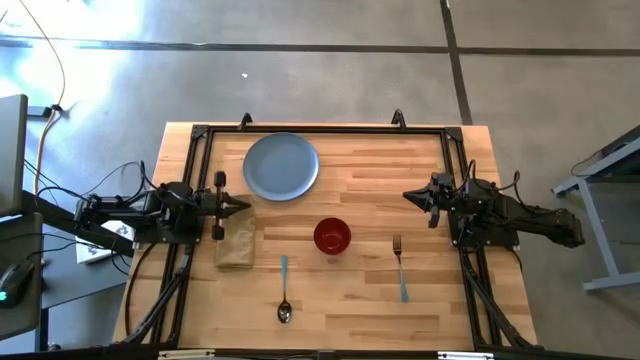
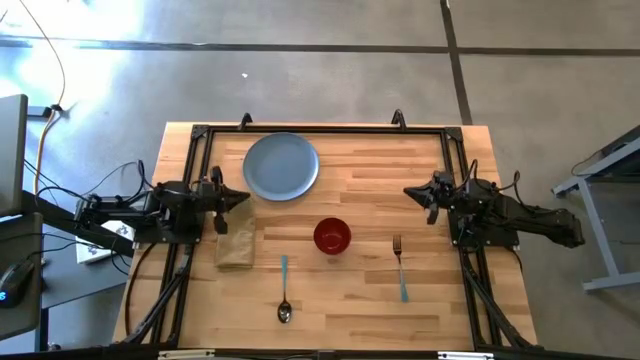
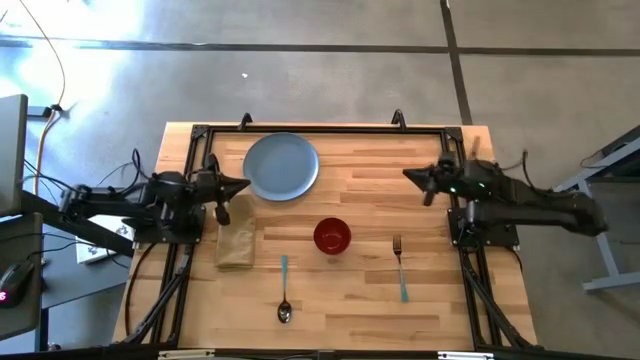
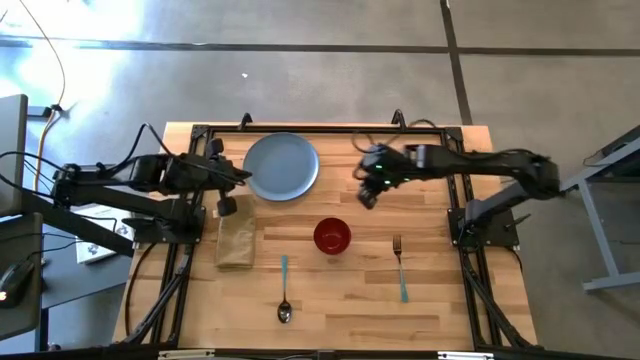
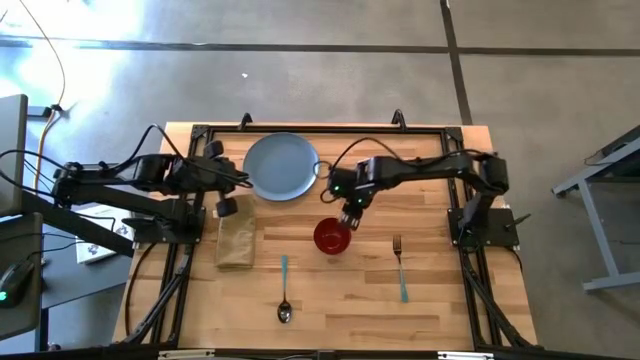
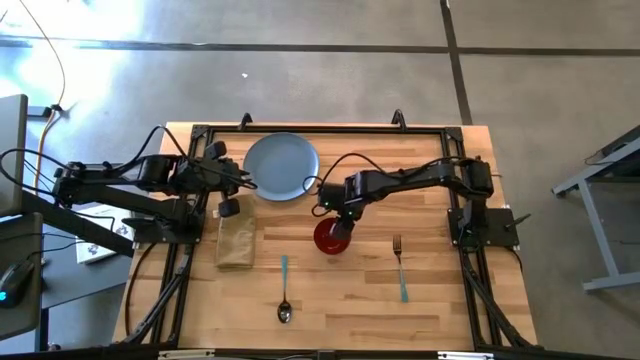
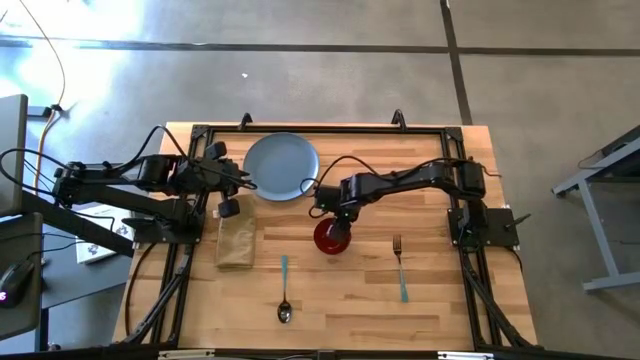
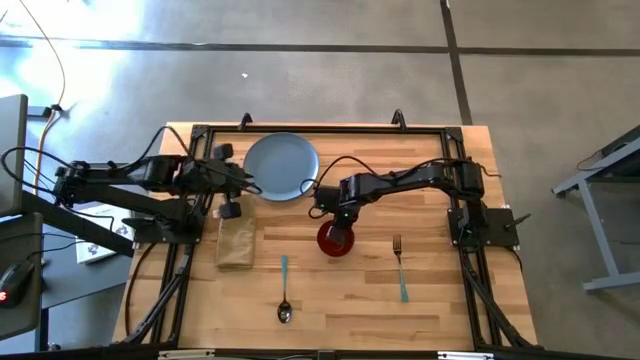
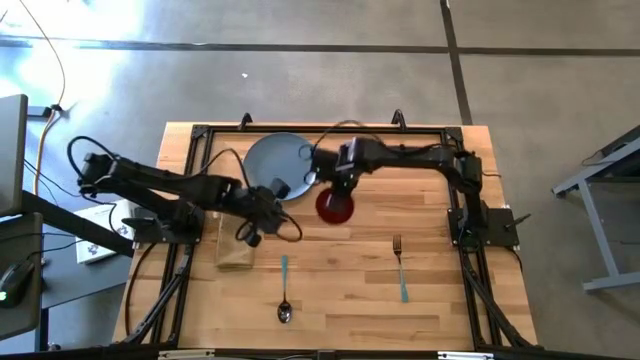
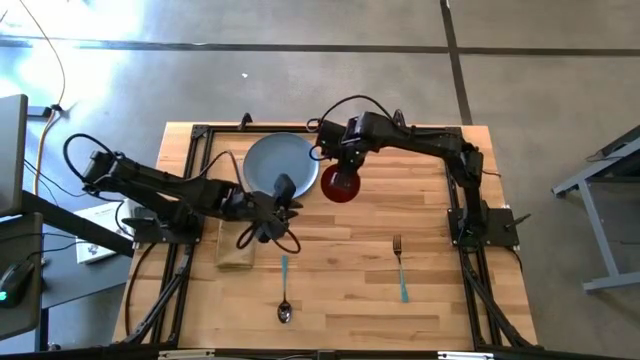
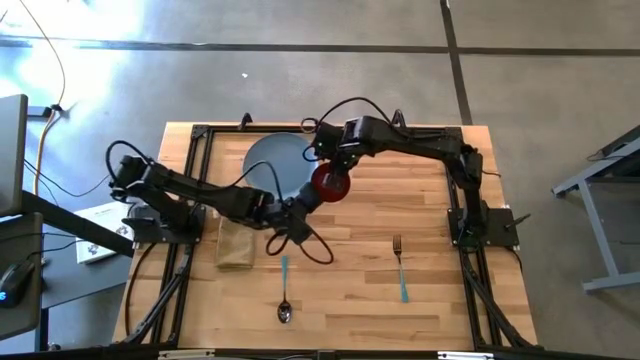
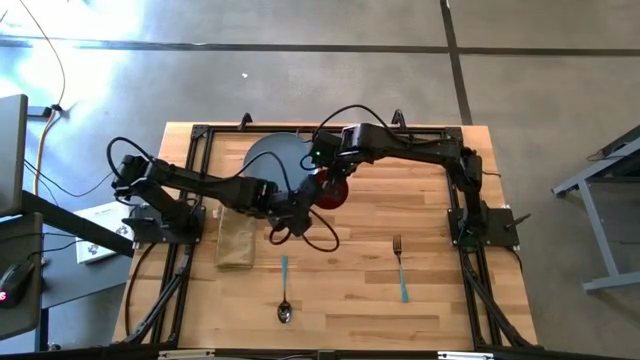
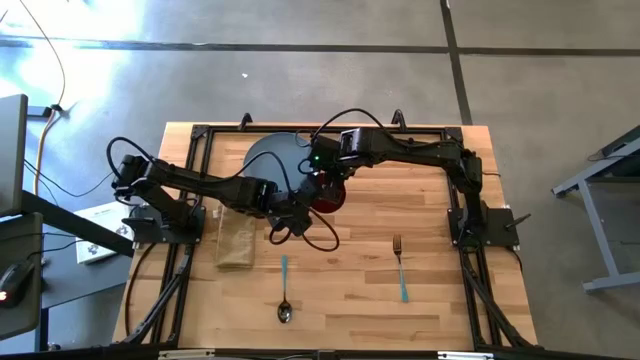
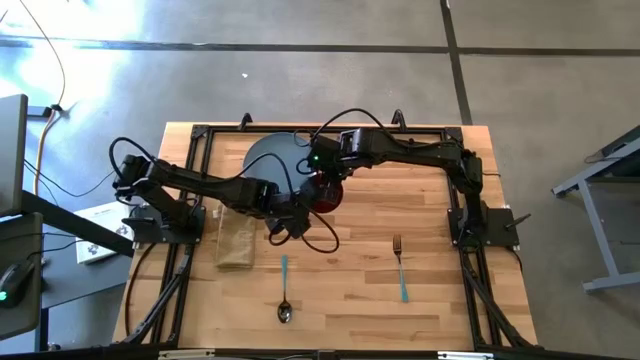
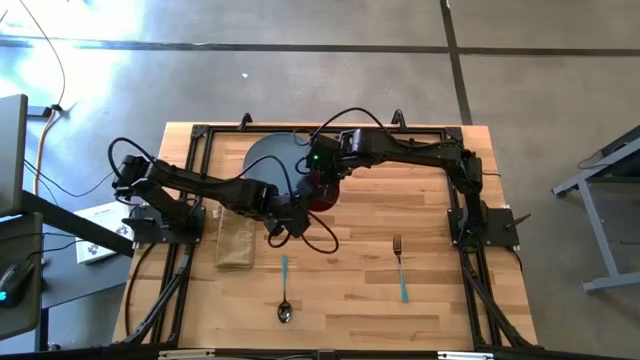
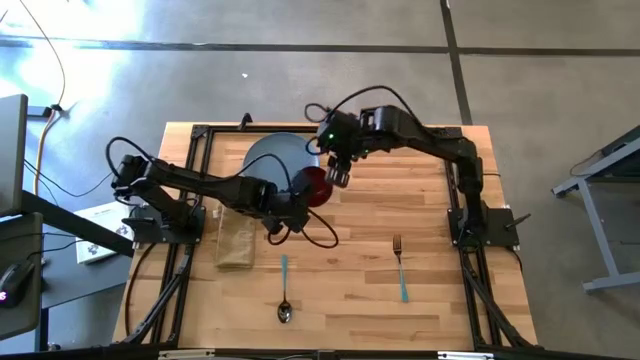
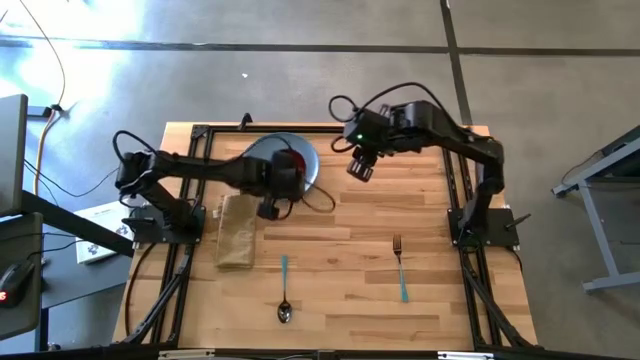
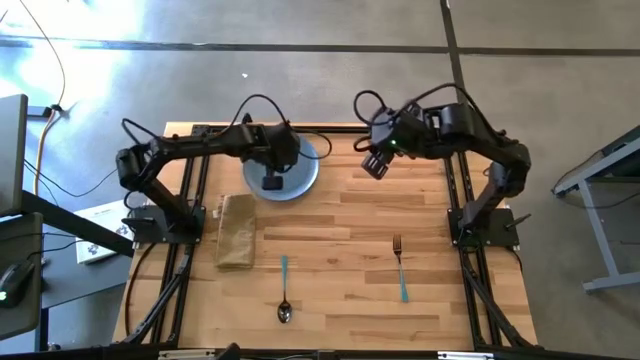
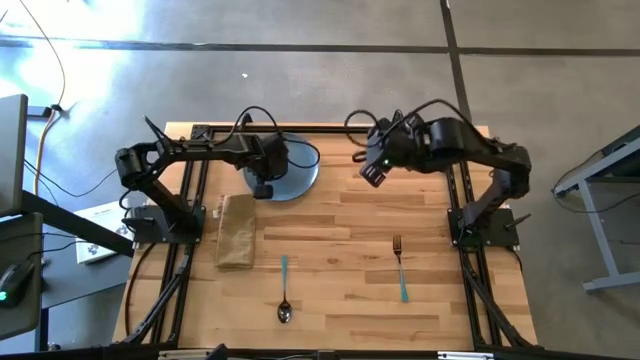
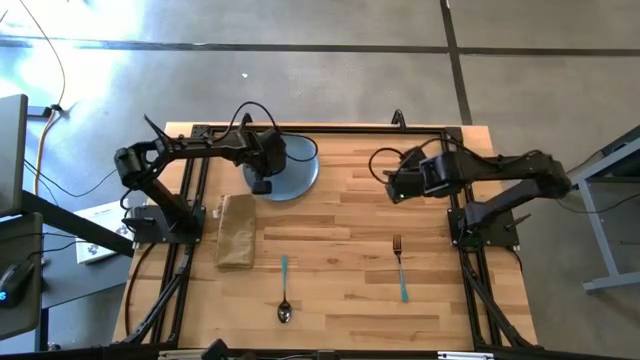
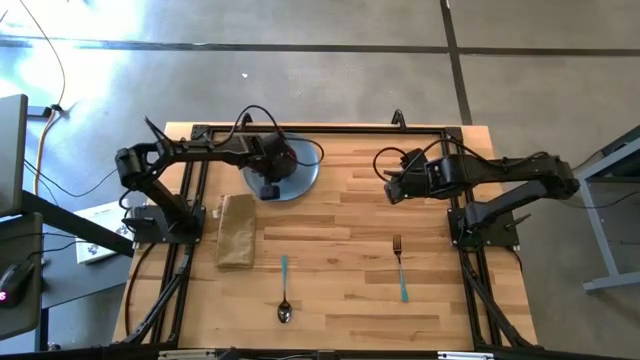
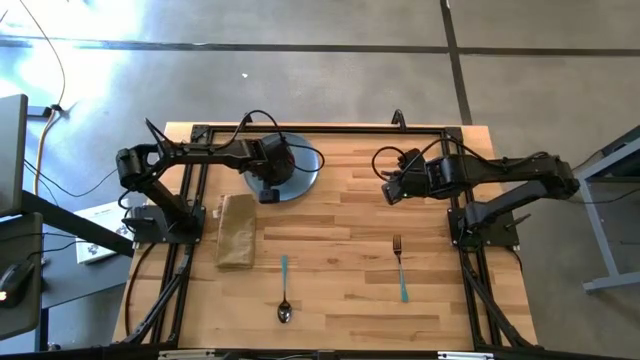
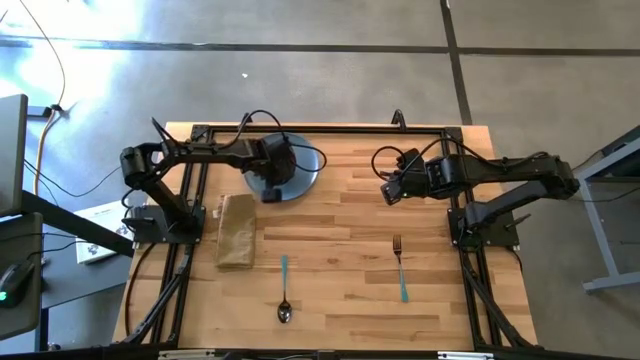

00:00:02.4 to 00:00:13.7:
Task: Set table place
Put the black bowl on the blue plate

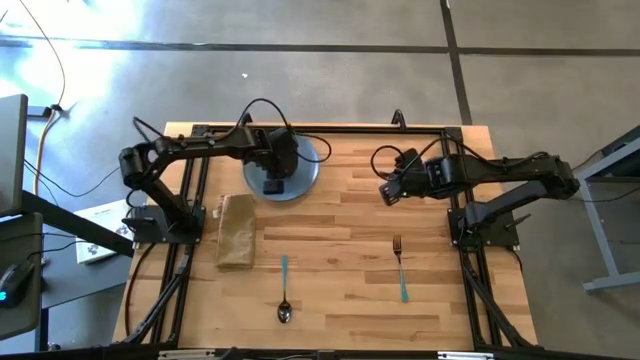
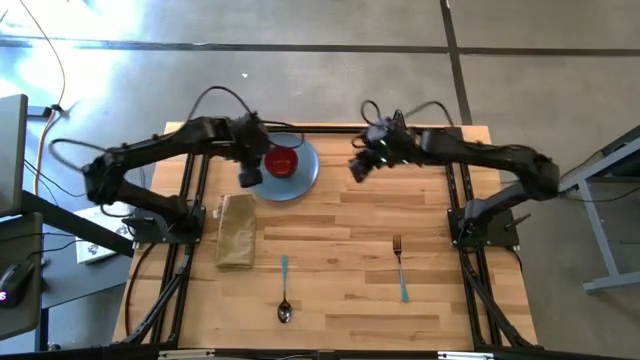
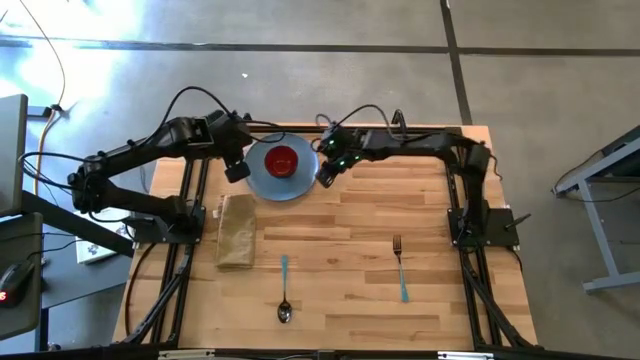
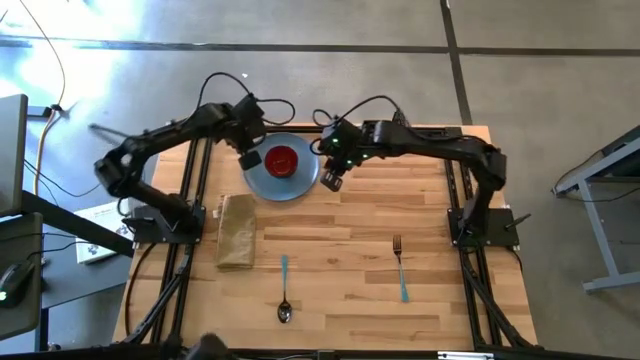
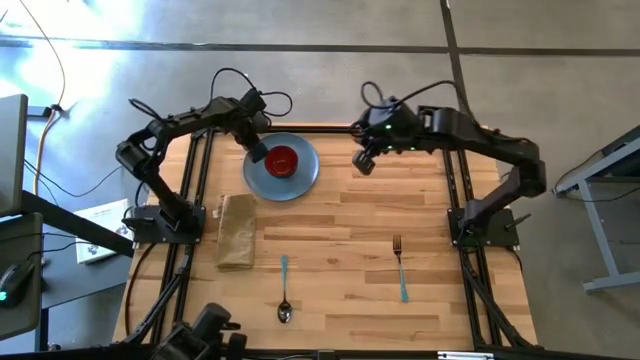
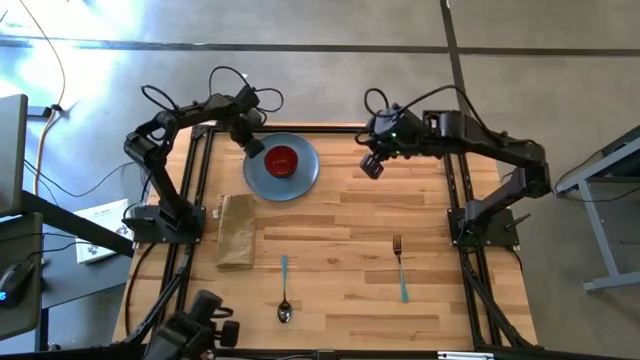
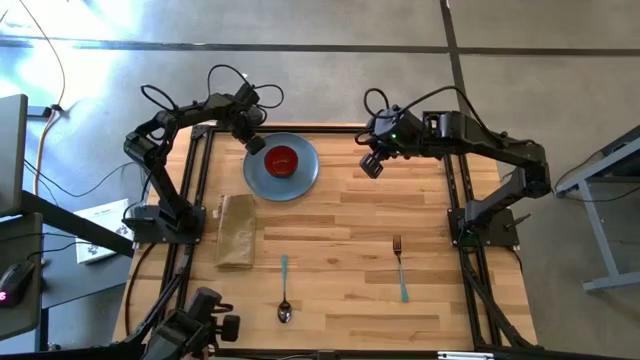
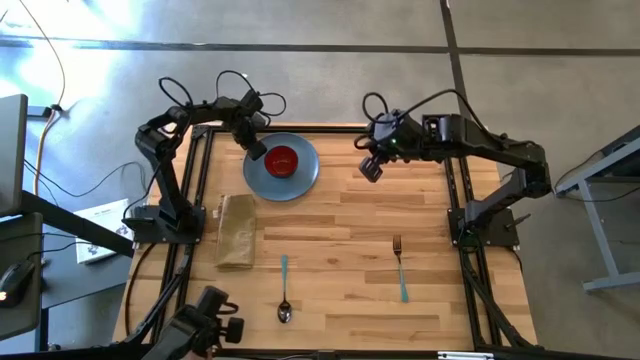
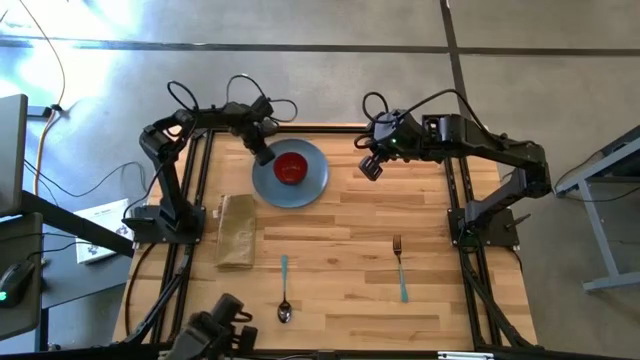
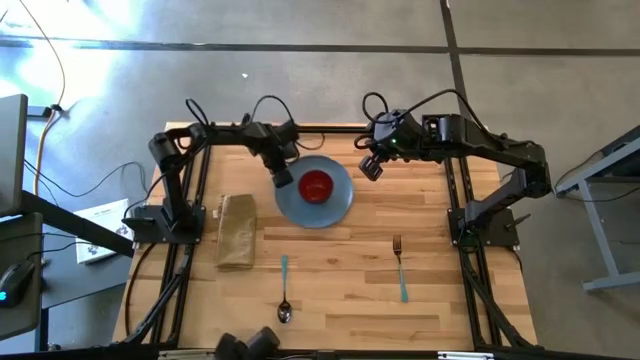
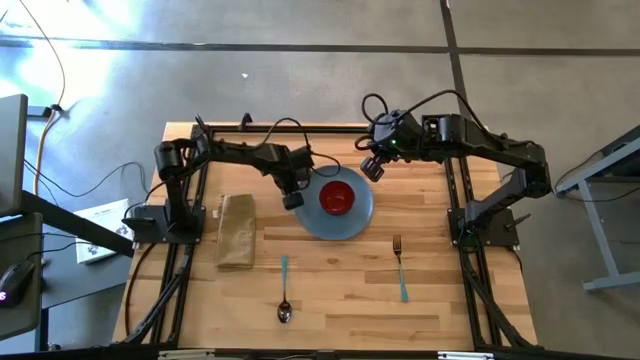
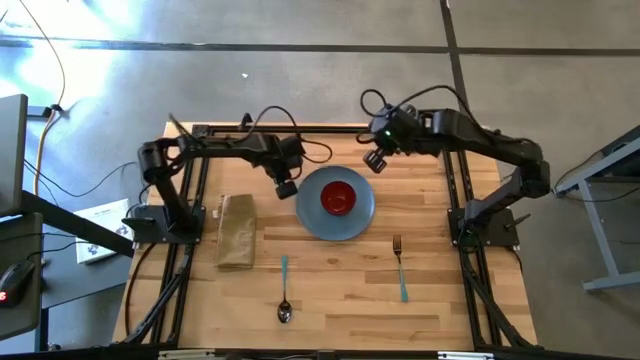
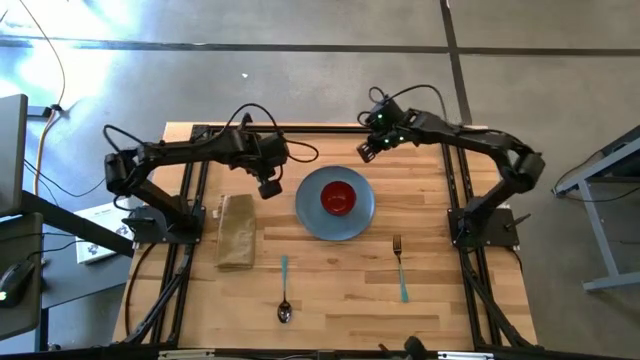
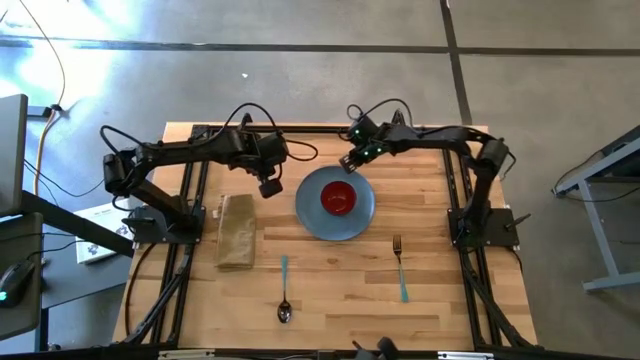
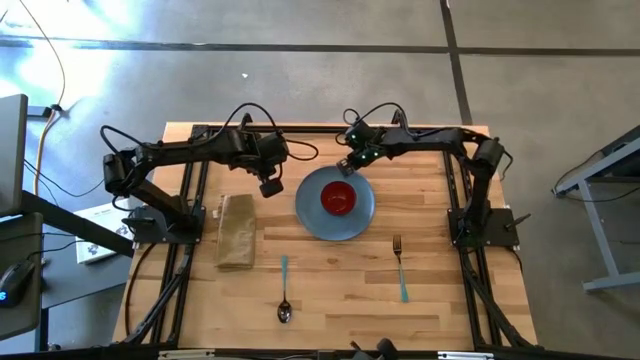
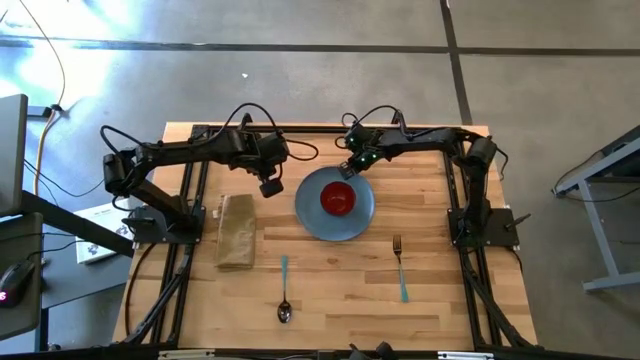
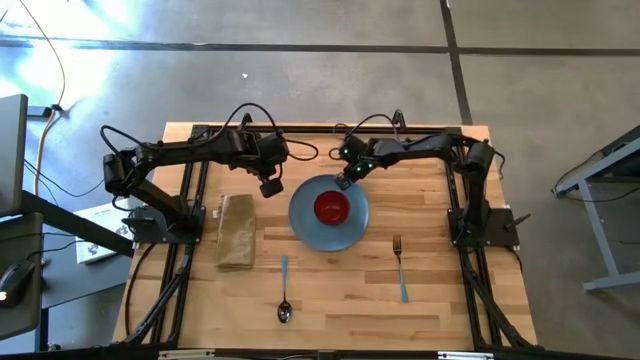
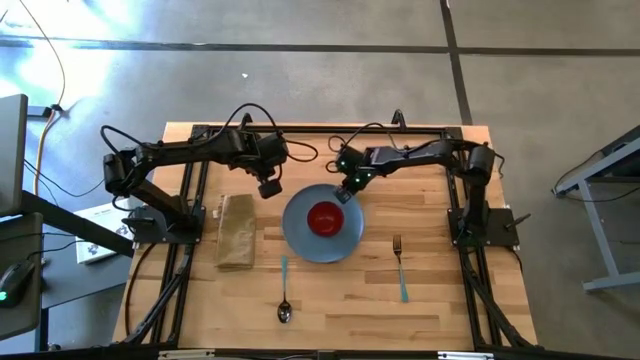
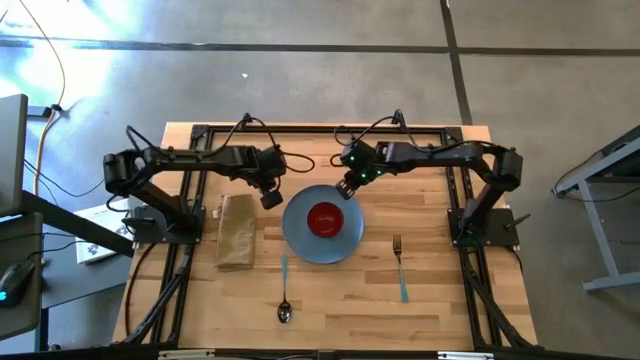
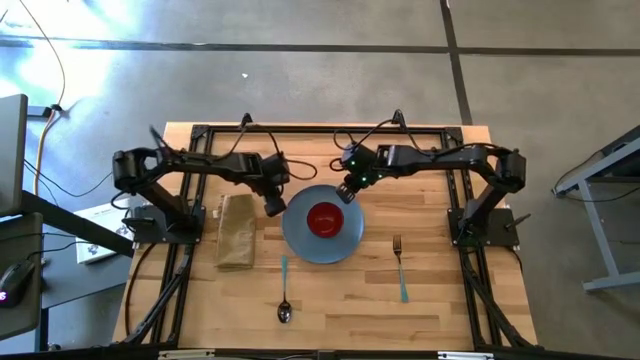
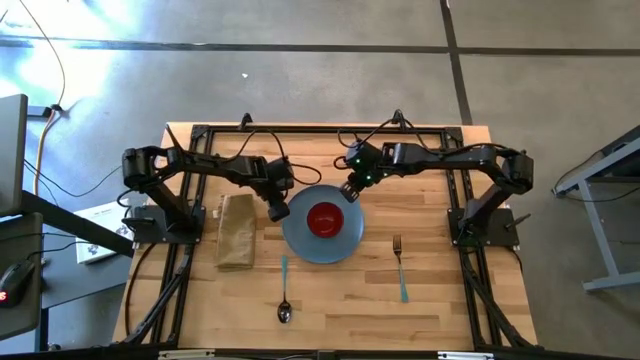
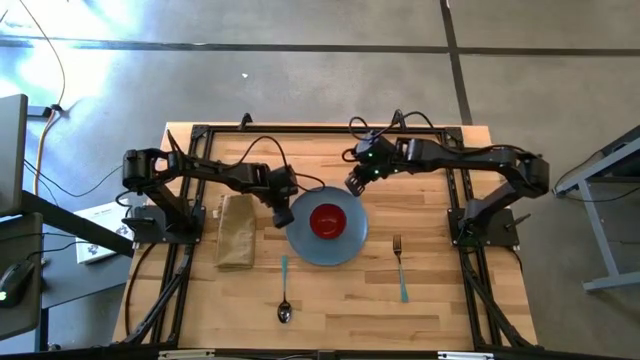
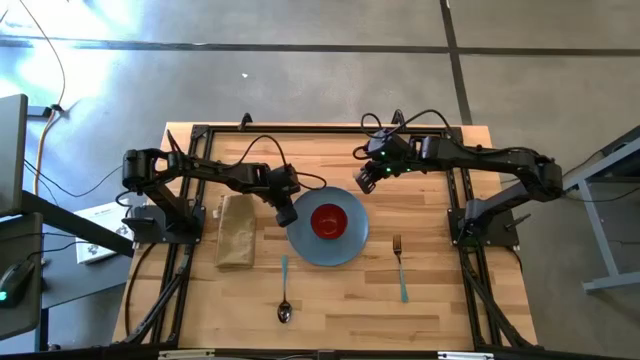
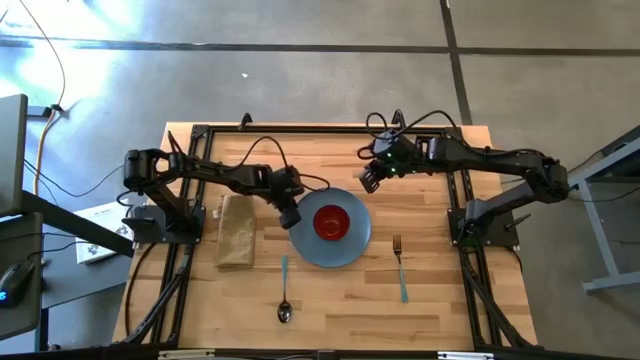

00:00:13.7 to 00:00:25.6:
Move the blue plate to the center of the table
